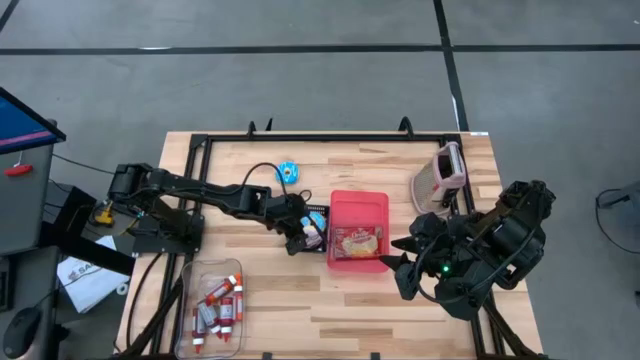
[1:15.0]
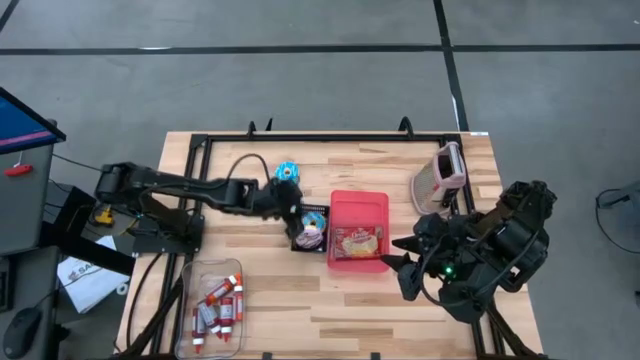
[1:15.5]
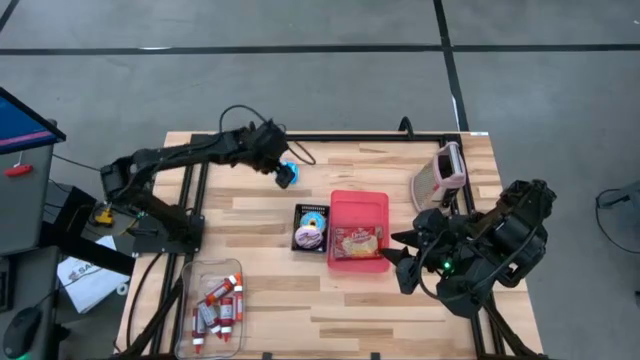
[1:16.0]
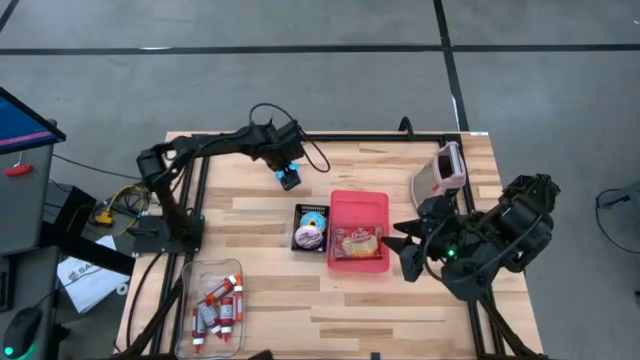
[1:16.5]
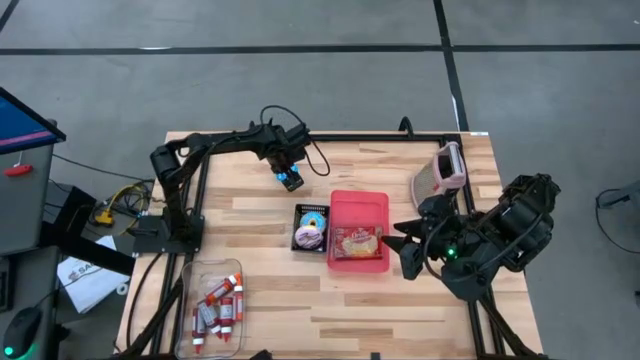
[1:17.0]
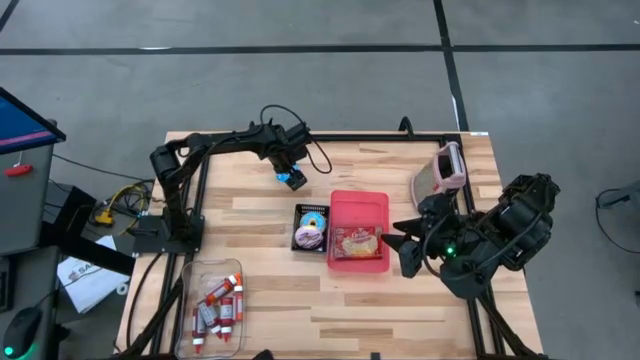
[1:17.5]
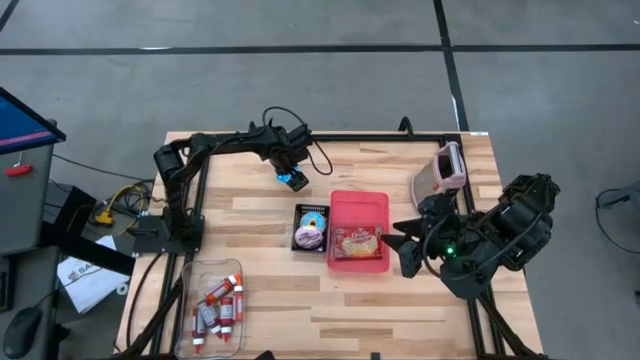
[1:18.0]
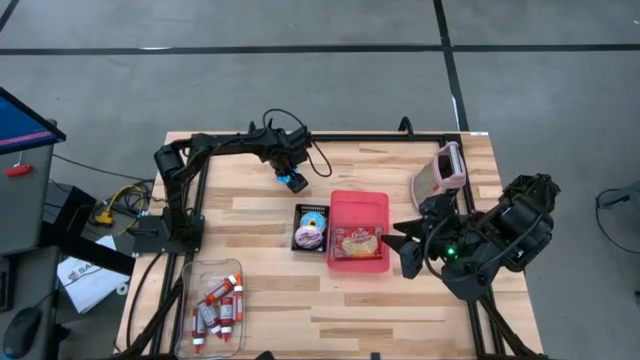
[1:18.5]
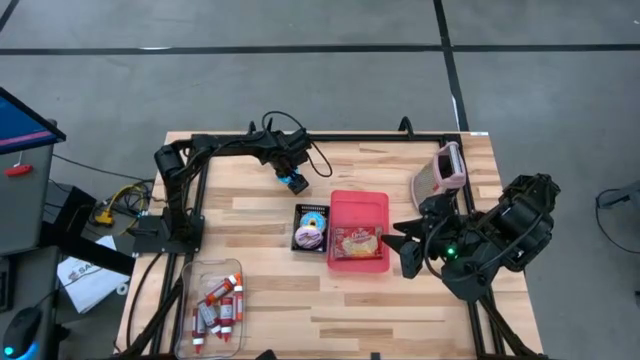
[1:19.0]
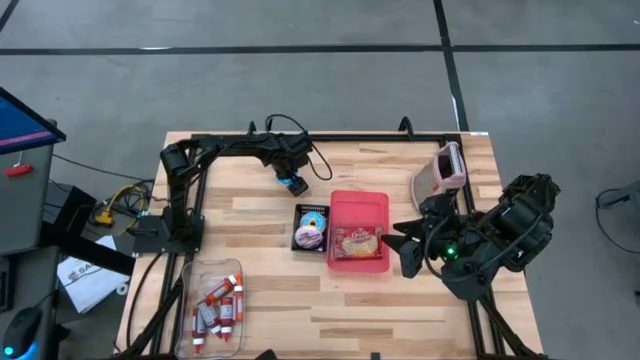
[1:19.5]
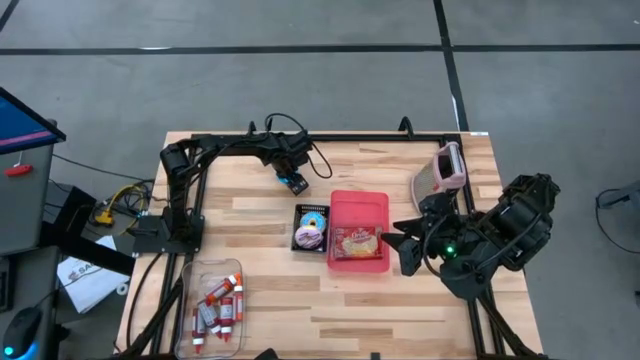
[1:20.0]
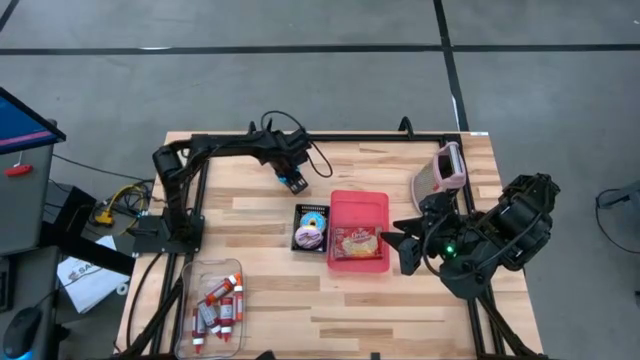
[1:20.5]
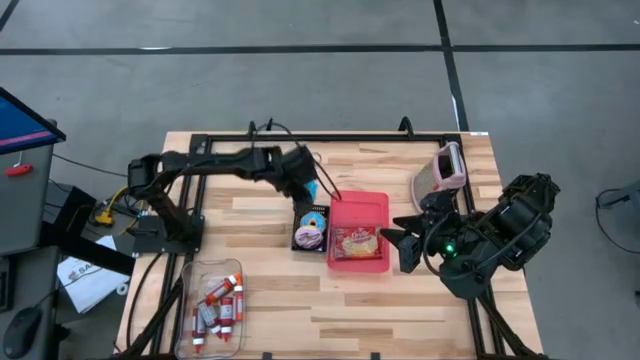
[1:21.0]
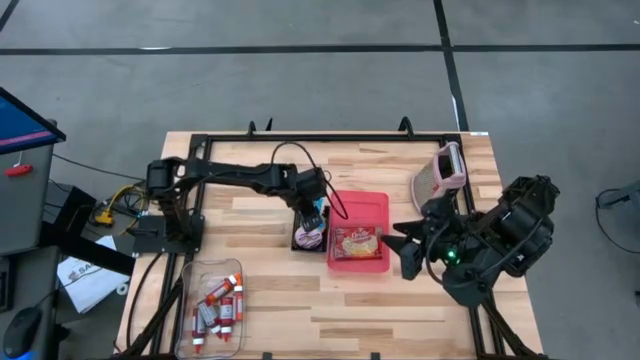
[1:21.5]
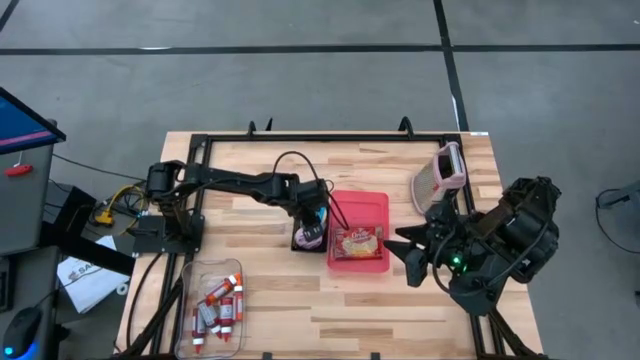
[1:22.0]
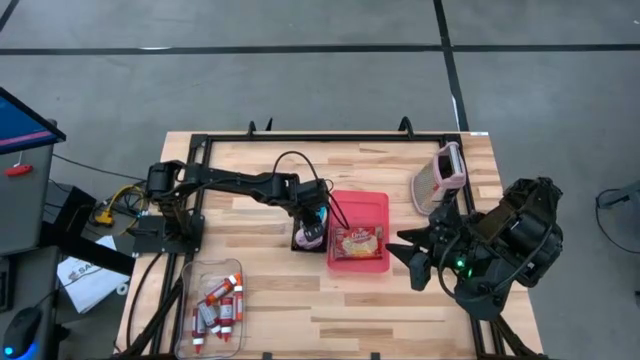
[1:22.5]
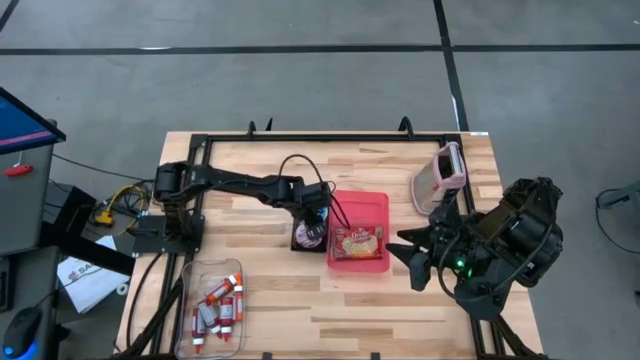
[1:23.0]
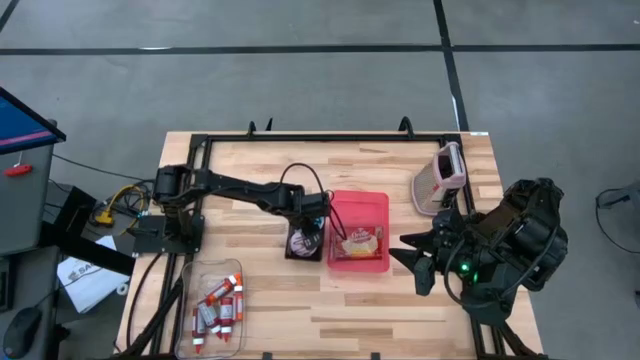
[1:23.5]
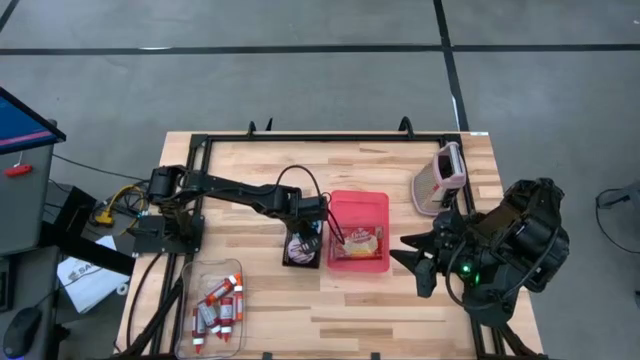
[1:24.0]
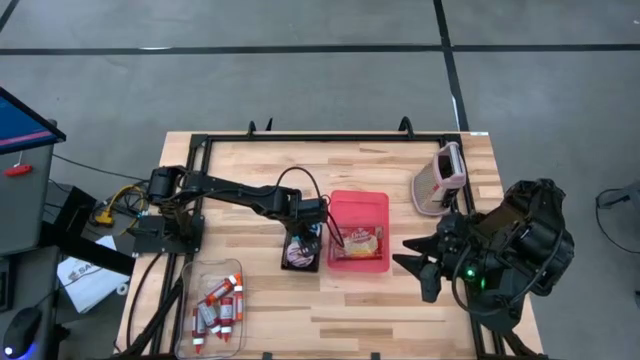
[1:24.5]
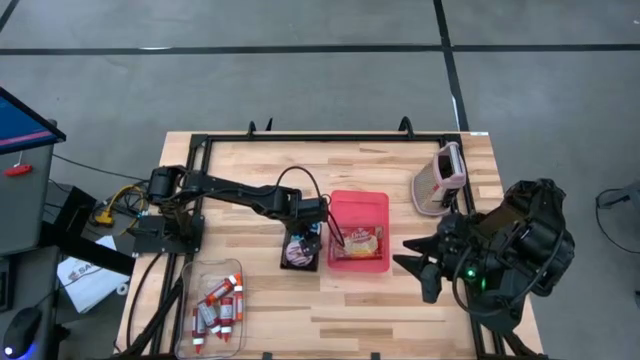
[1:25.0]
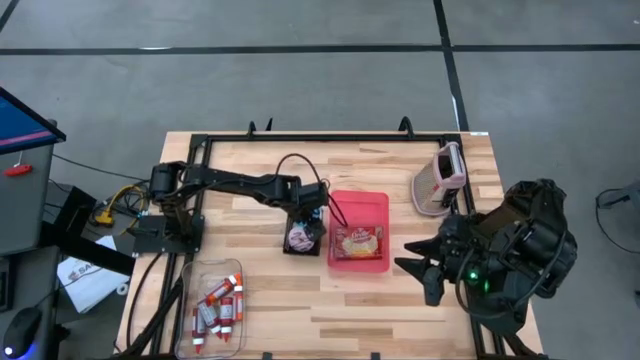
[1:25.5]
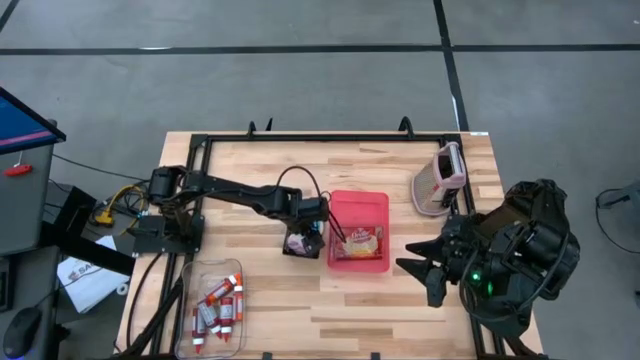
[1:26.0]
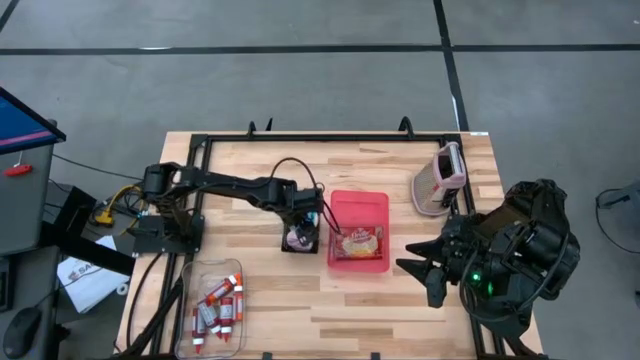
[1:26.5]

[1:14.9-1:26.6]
Put the blue donut into the black bin

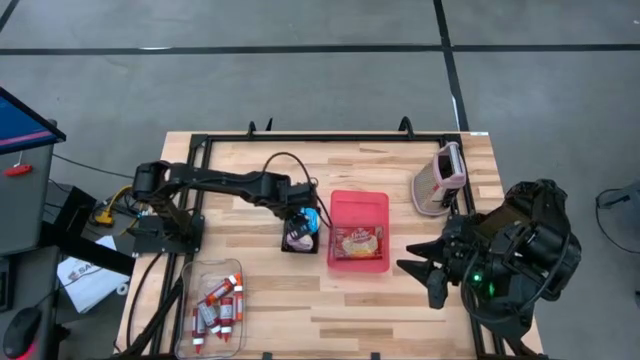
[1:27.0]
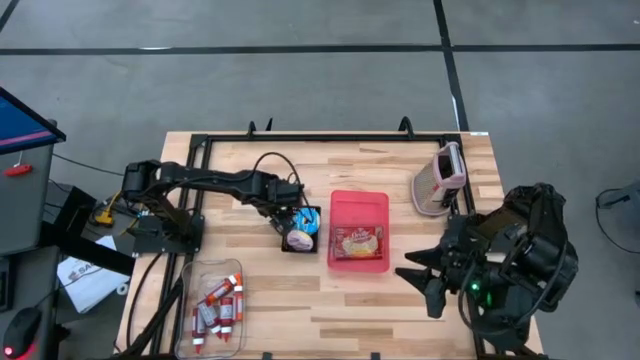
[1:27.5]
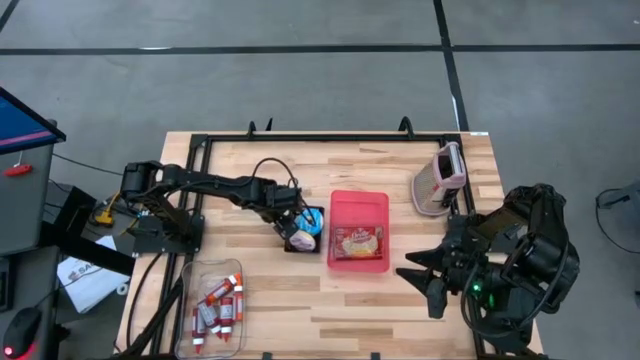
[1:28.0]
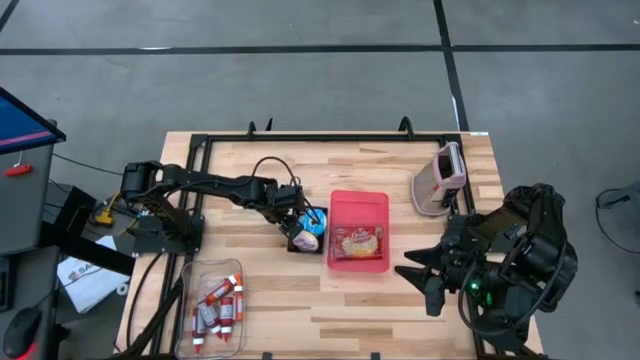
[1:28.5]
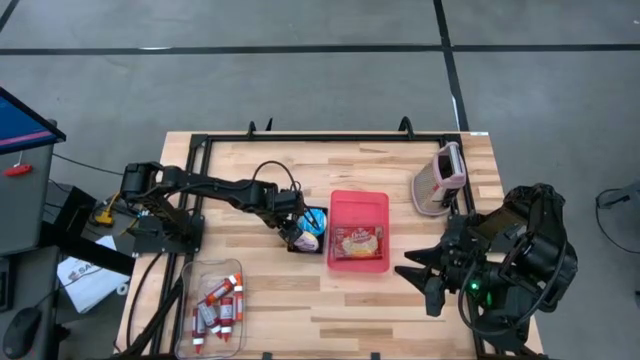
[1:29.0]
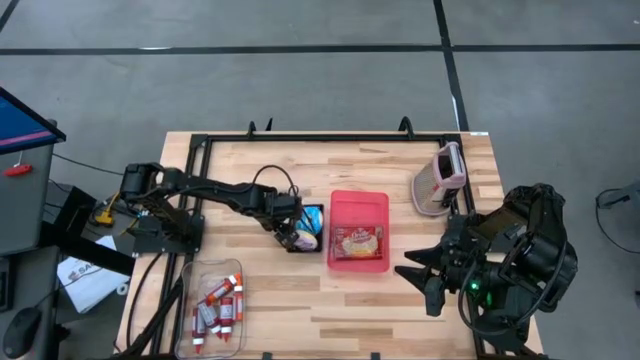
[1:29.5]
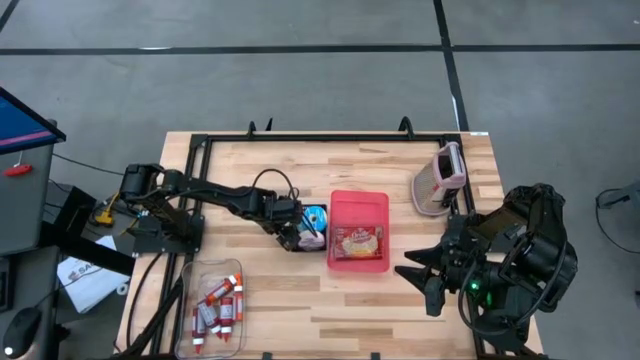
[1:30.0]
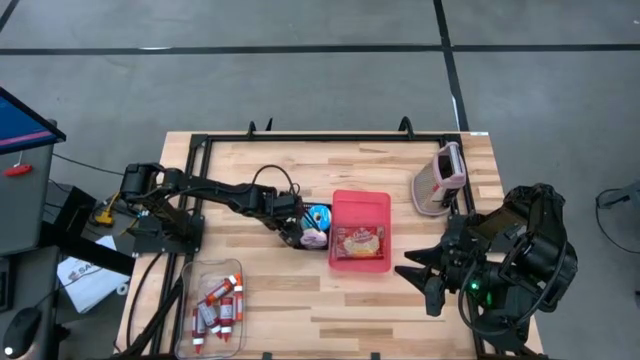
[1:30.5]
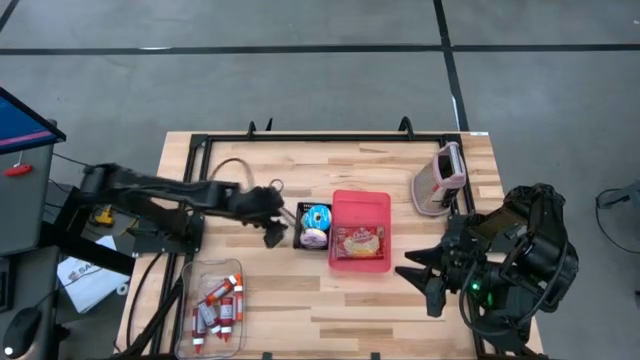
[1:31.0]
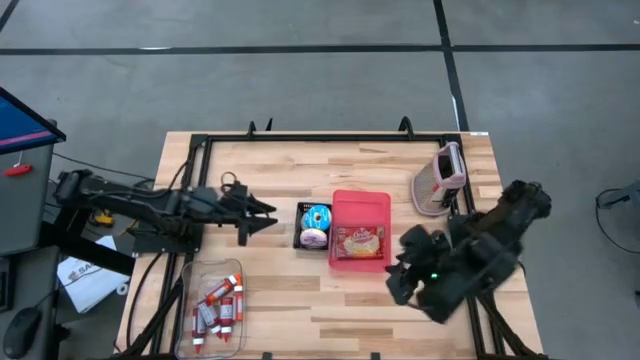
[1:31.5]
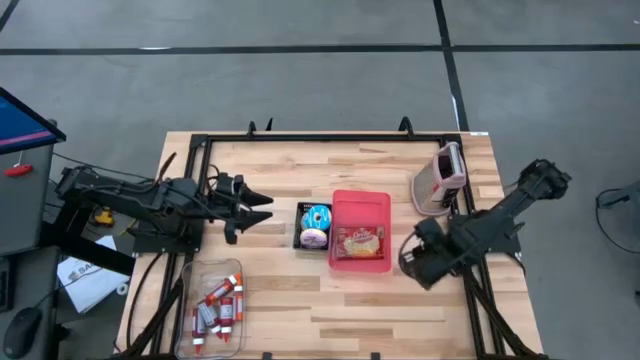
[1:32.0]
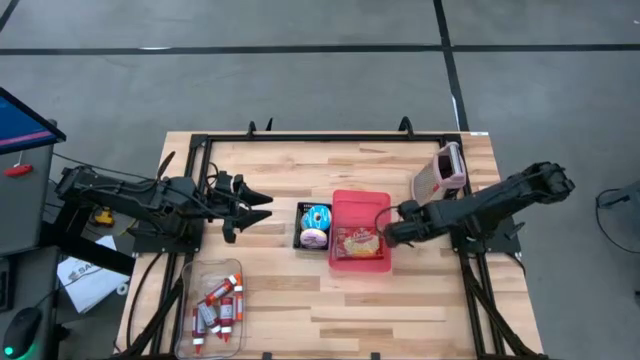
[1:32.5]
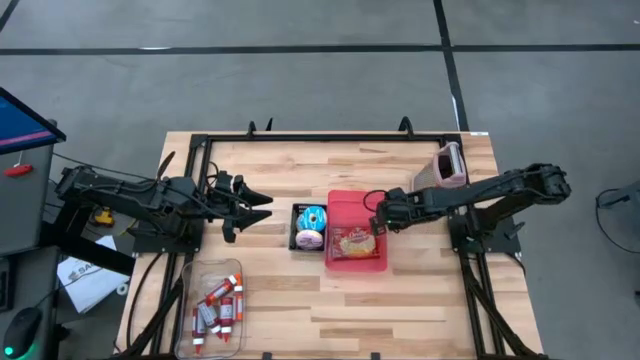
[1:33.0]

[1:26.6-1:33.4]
Adjust the bins
